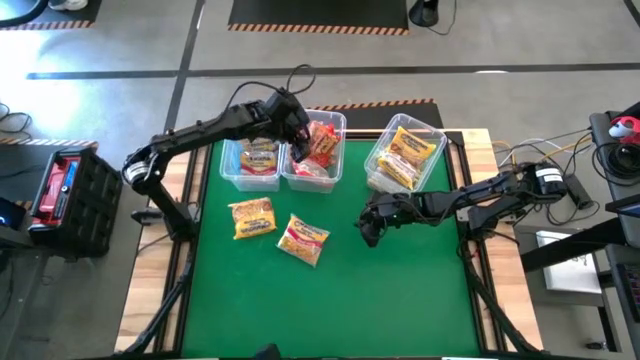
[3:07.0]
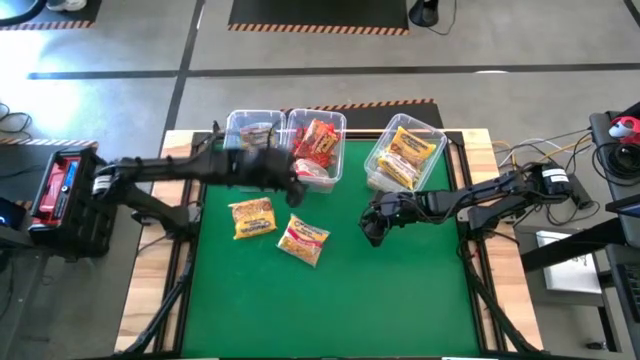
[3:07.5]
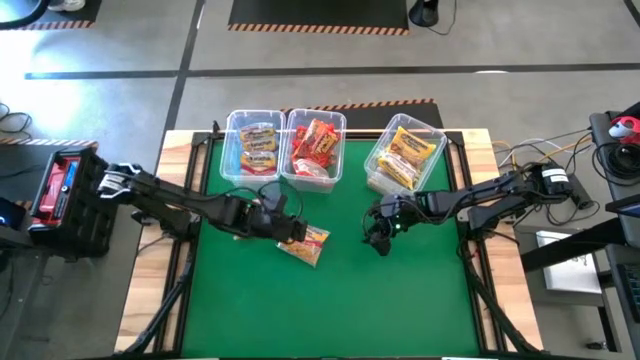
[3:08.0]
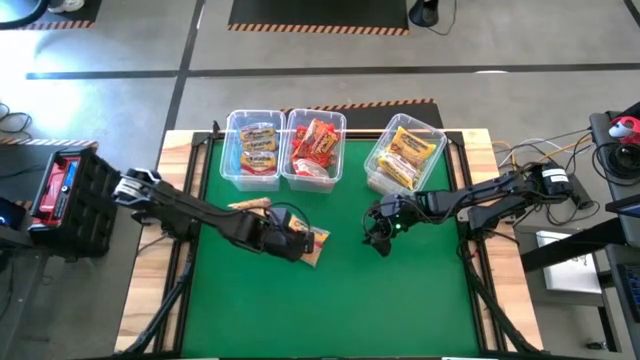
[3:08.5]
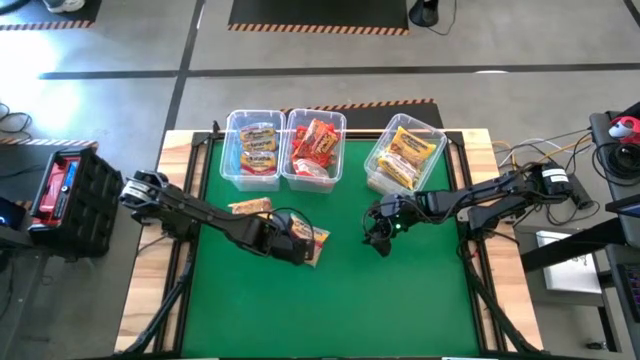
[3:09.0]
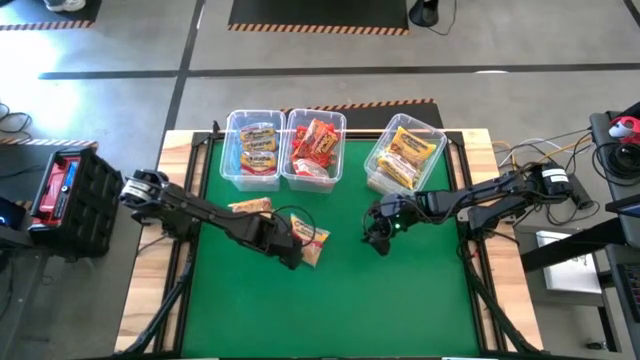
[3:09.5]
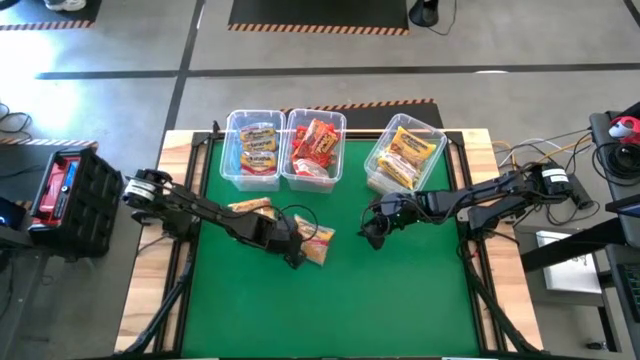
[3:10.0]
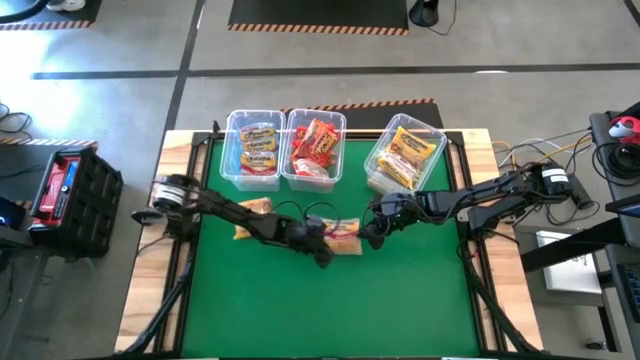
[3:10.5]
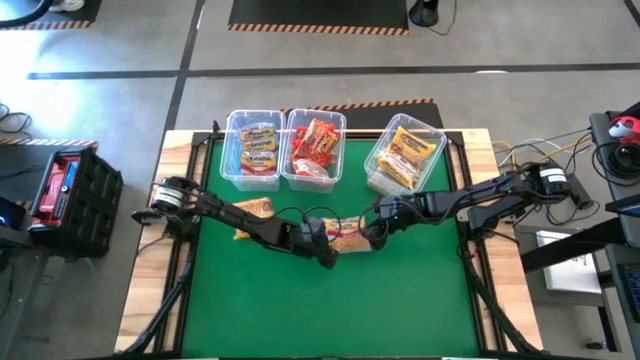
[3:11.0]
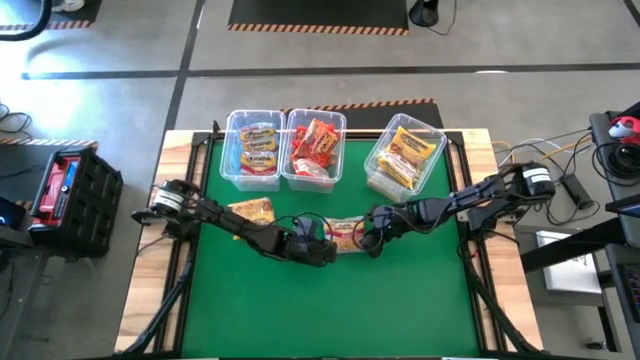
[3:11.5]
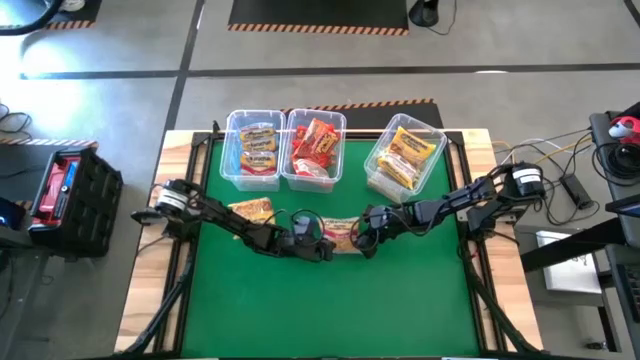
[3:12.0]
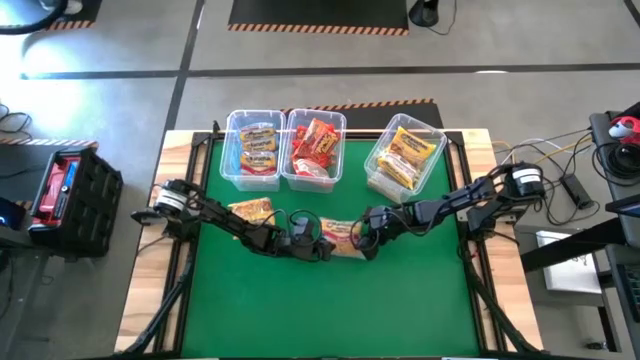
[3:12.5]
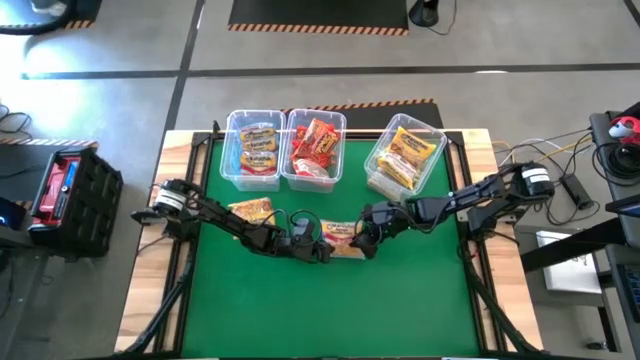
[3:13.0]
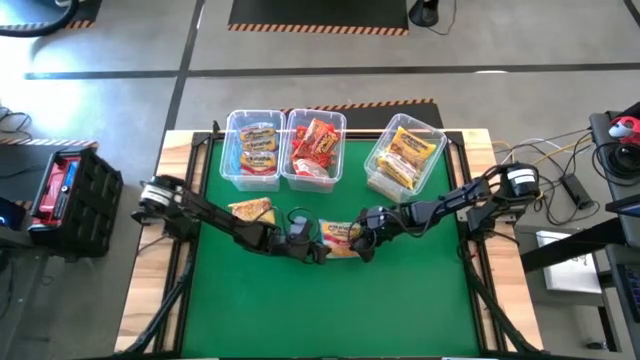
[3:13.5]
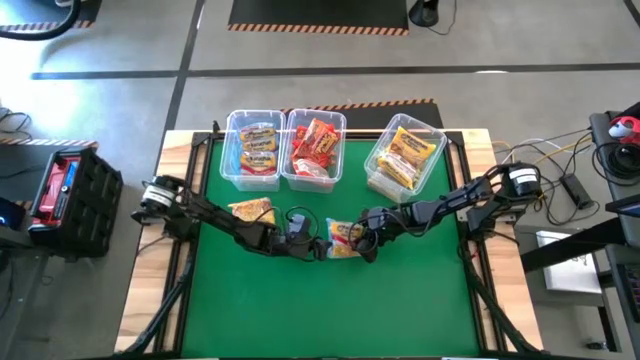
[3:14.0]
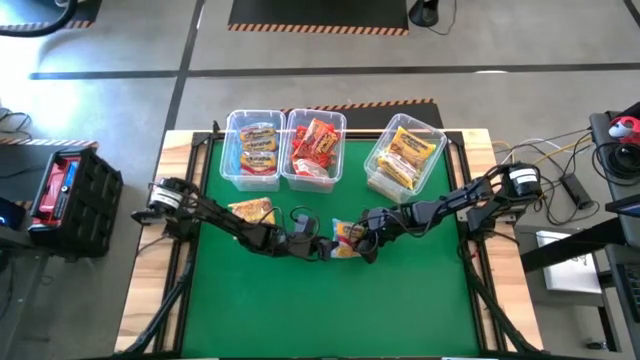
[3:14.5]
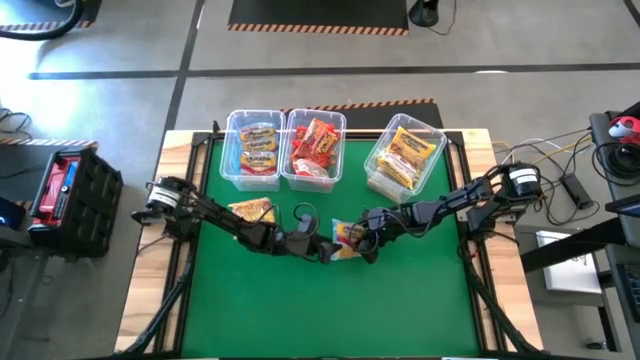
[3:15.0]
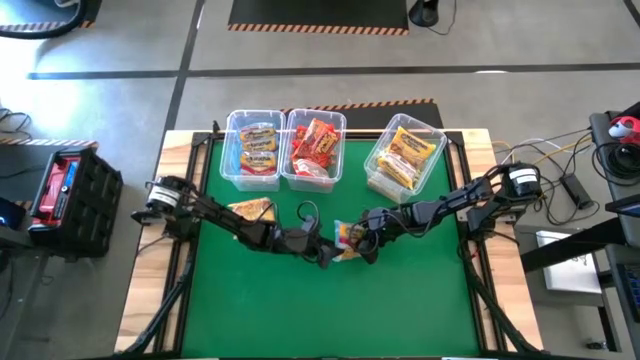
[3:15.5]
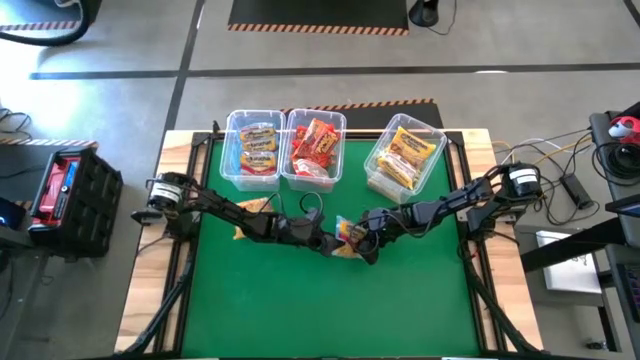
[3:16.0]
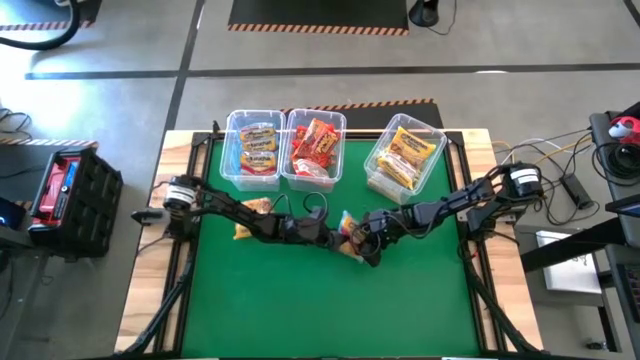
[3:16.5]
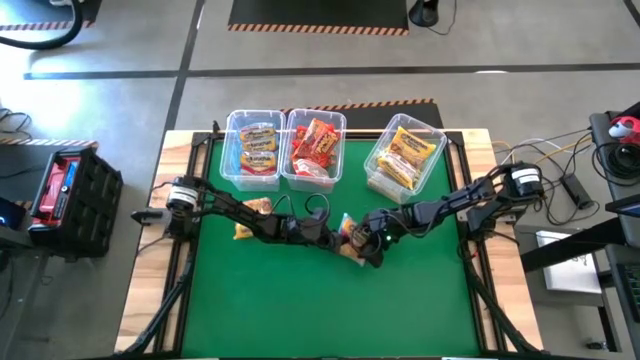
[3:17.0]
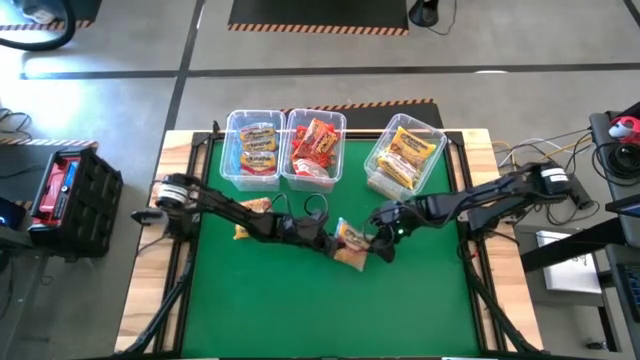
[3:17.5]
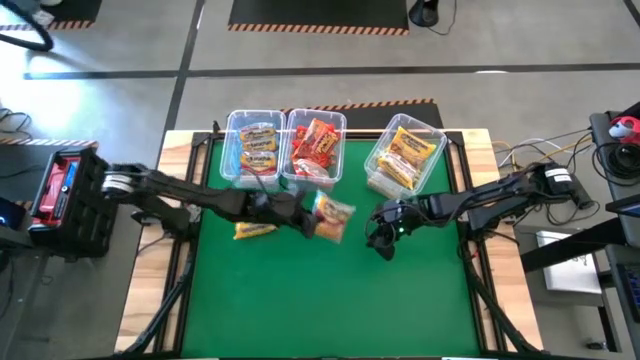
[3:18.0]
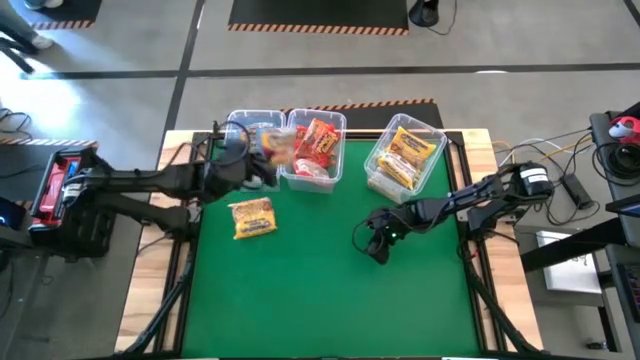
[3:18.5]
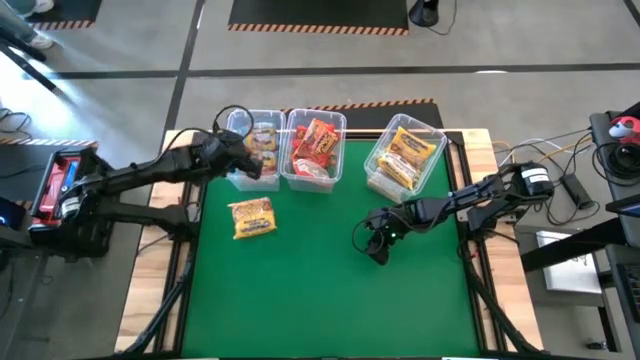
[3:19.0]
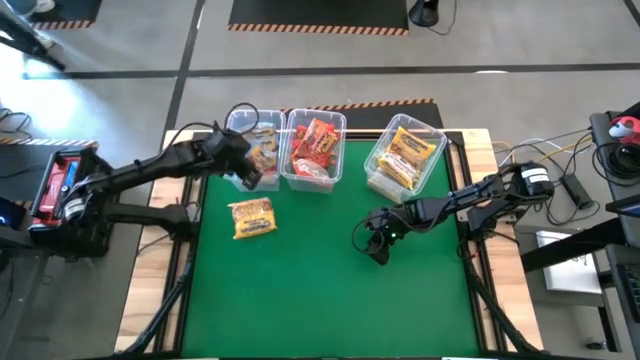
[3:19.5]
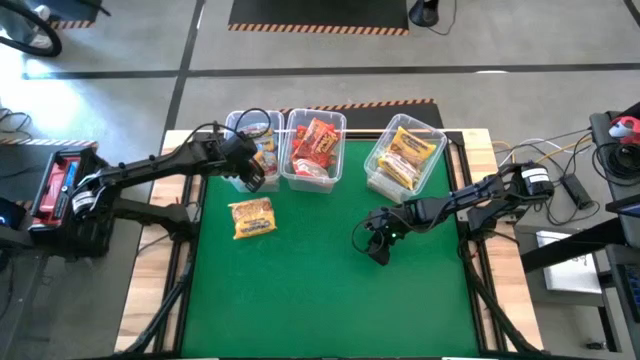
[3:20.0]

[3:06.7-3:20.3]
Task: Sort Maruchan noodles
Put the blue noodle pack into the top left transparent bin

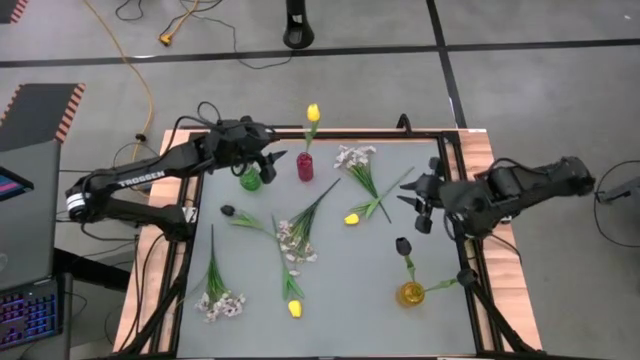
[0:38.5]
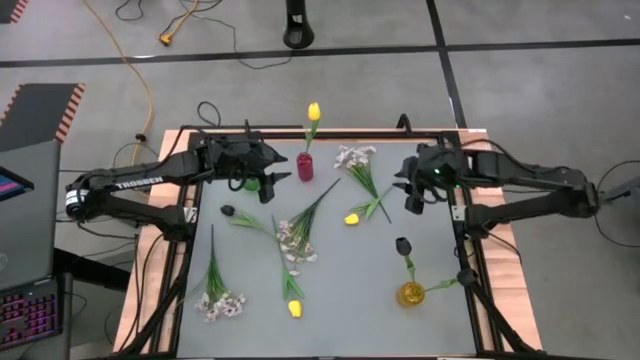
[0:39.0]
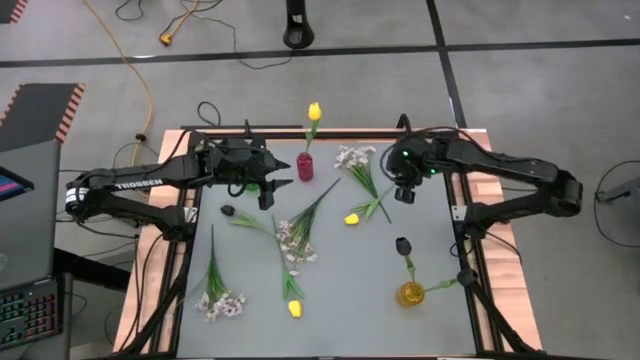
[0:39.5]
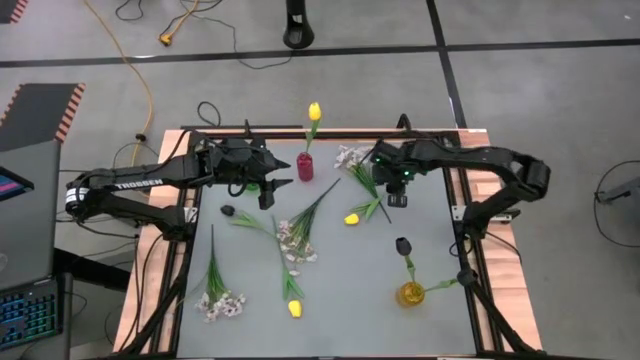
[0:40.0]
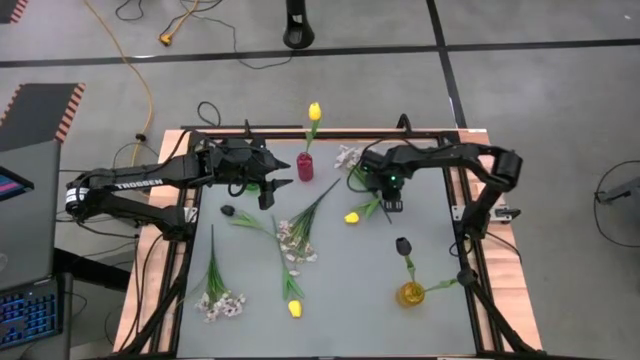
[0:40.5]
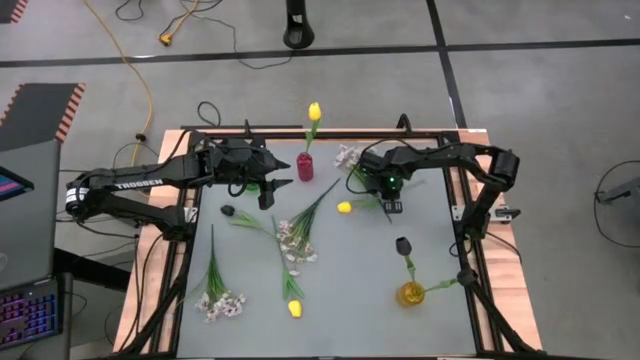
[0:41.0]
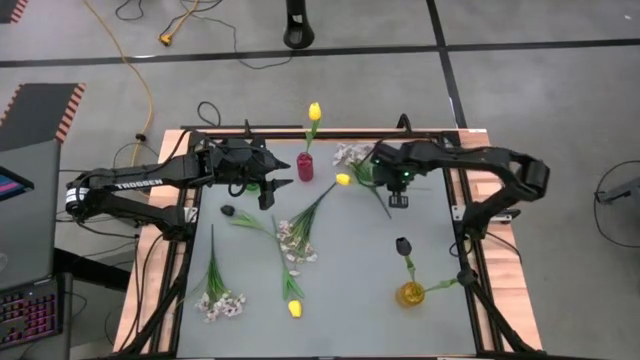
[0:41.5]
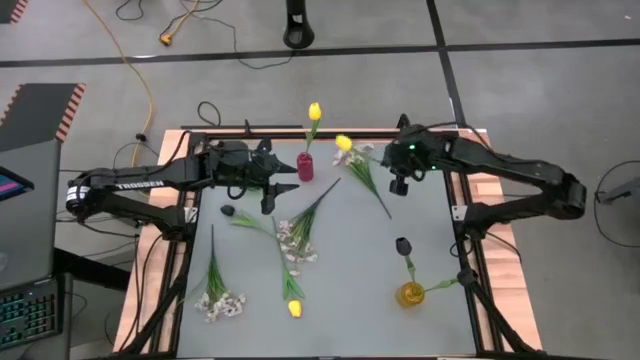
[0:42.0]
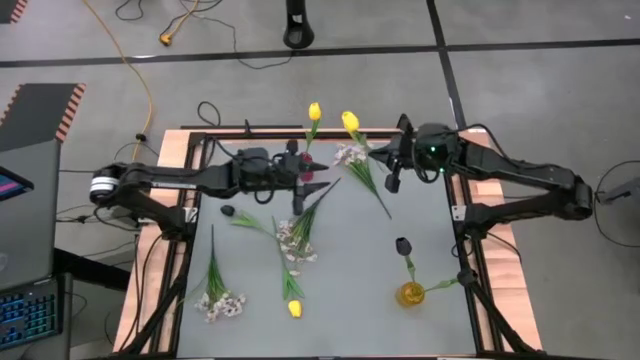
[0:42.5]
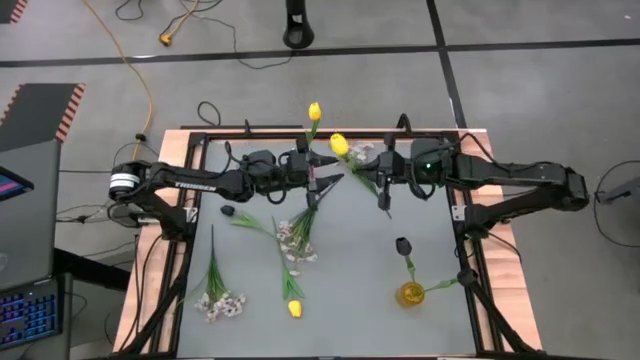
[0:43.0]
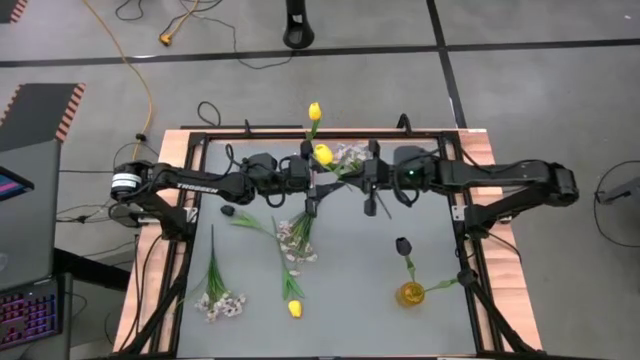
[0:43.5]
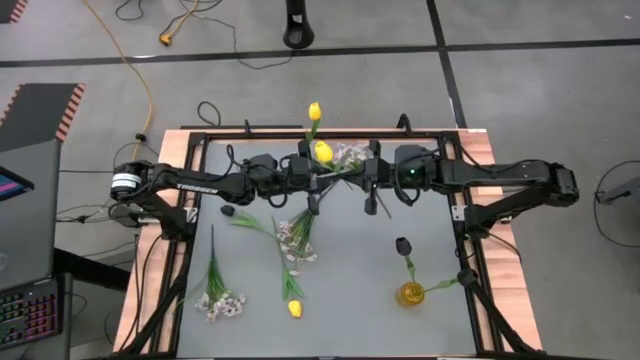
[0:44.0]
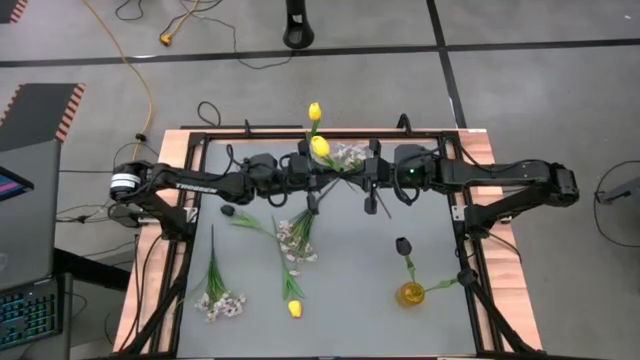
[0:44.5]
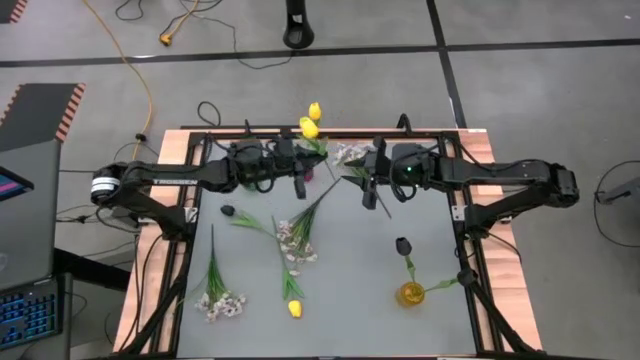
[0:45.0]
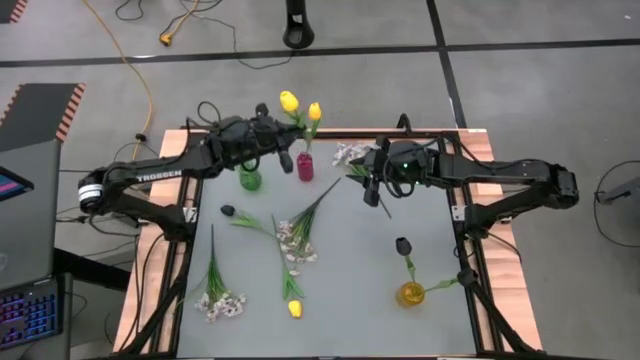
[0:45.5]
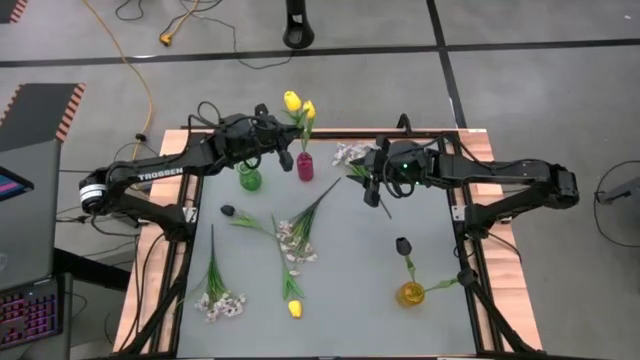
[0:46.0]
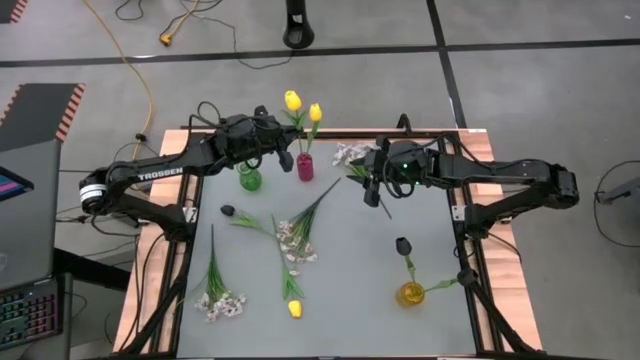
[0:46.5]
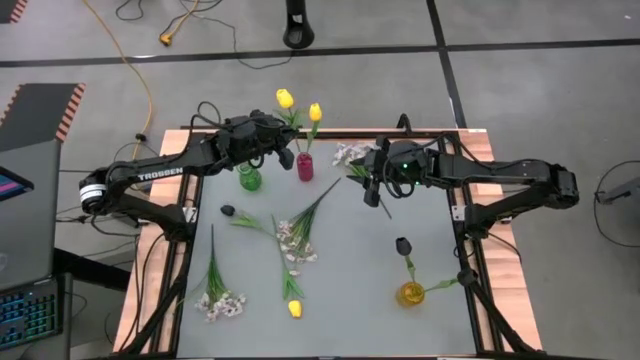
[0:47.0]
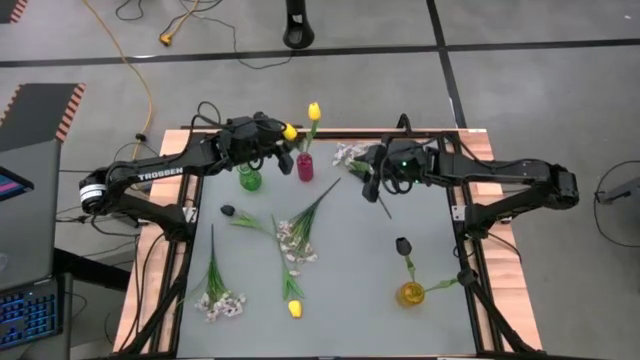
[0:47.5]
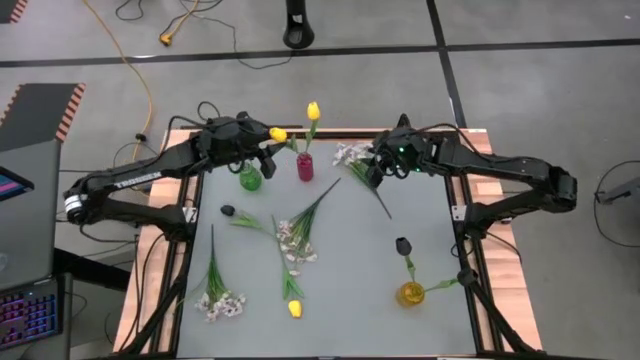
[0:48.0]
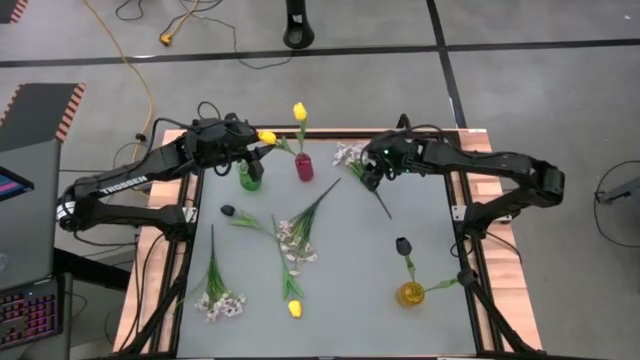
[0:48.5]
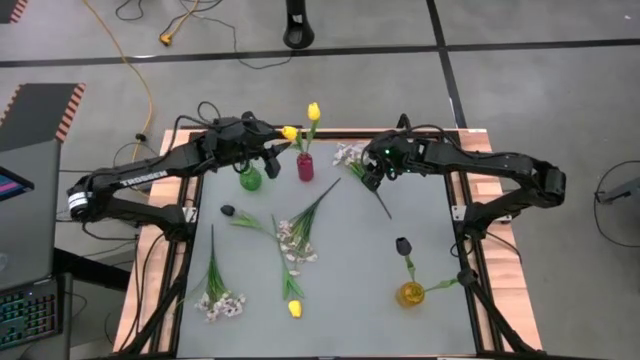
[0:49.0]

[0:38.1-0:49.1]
Task: Sort flowers into vase by color
Put the top yellow tulip into the red vase
